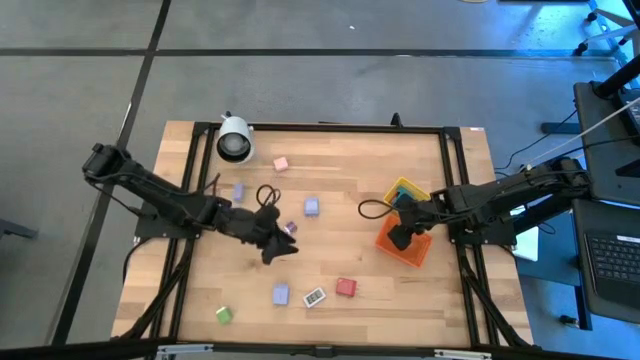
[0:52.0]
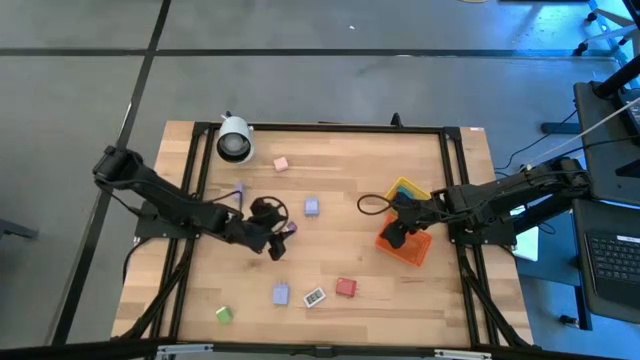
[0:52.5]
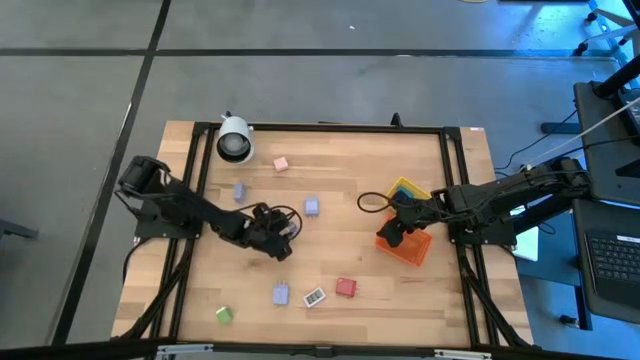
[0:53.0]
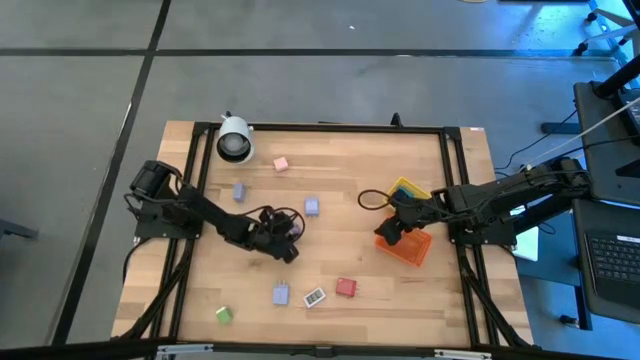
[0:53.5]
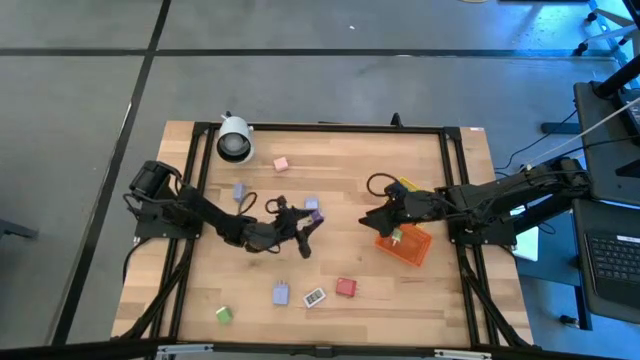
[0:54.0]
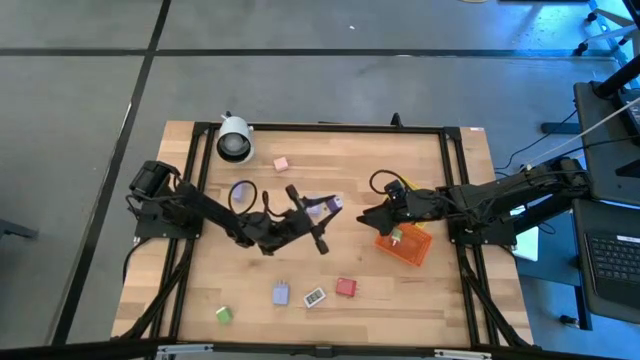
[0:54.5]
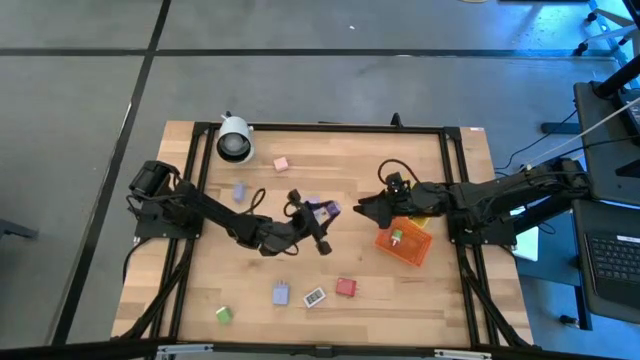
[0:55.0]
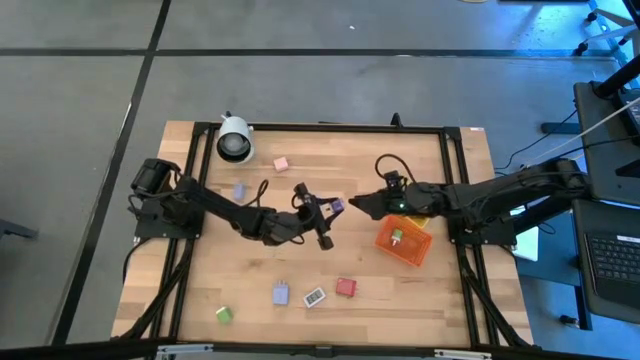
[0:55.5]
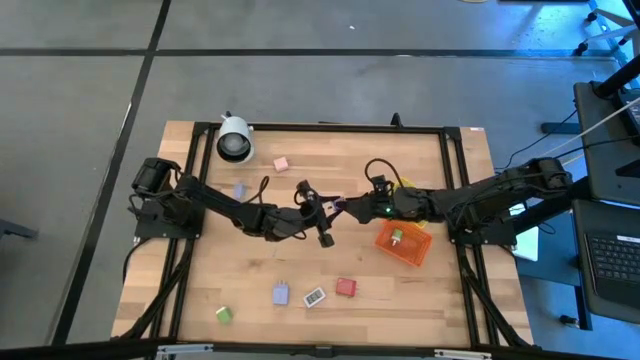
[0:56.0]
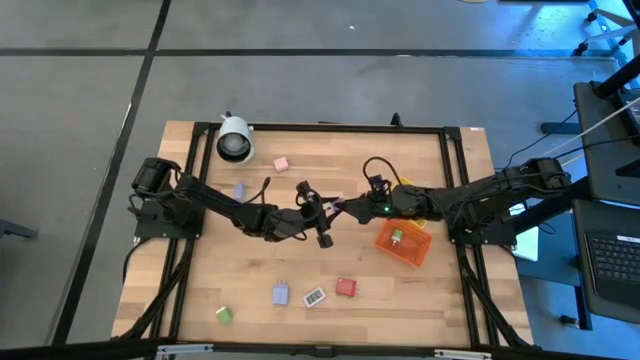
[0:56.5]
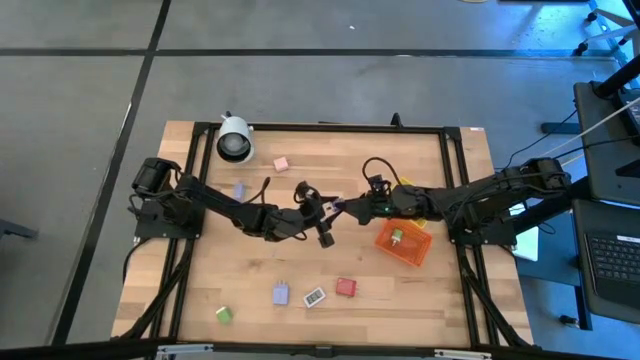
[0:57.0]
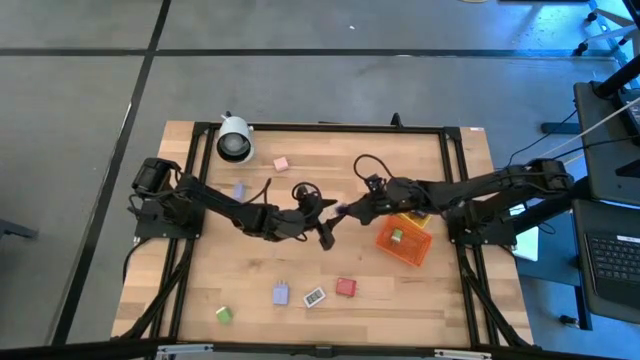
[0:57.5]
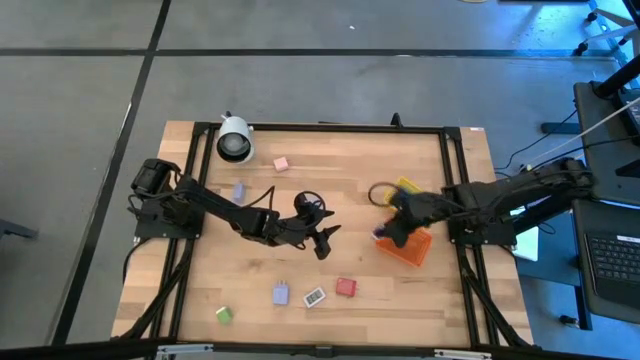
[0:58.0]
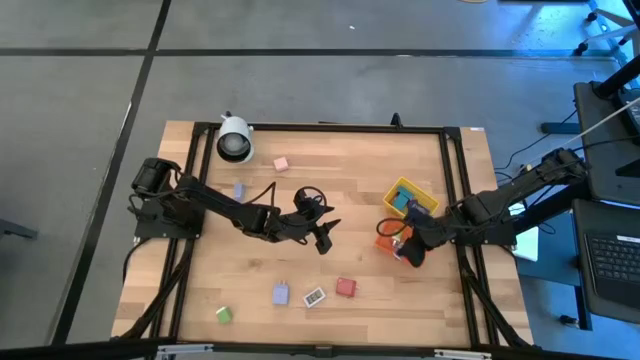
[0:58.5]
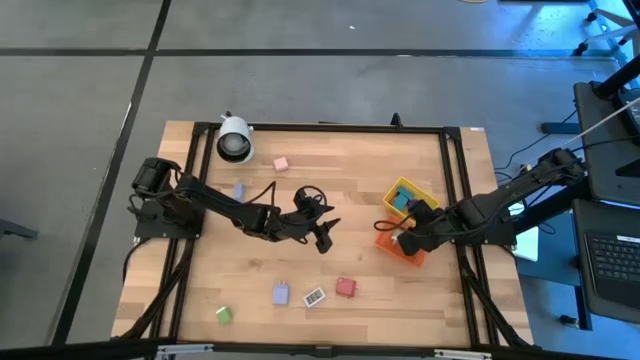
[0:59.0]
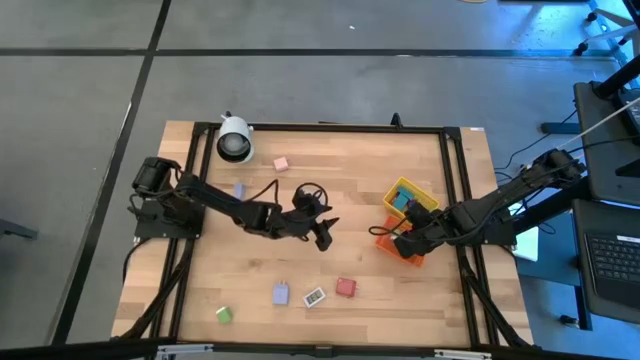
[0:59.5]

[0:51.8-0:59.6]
Task: Pick & Place Office items
Put the purple charger adapter into the orange basket

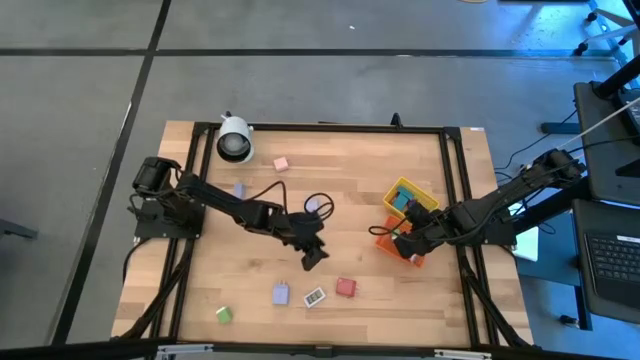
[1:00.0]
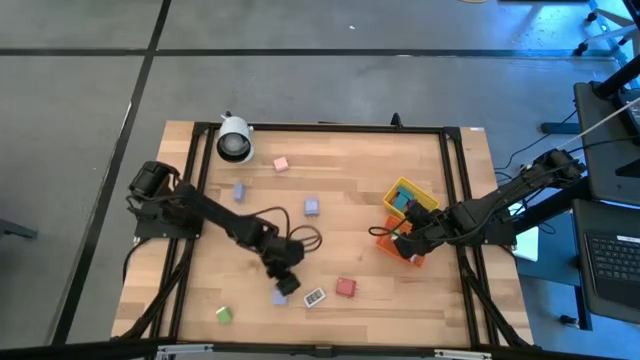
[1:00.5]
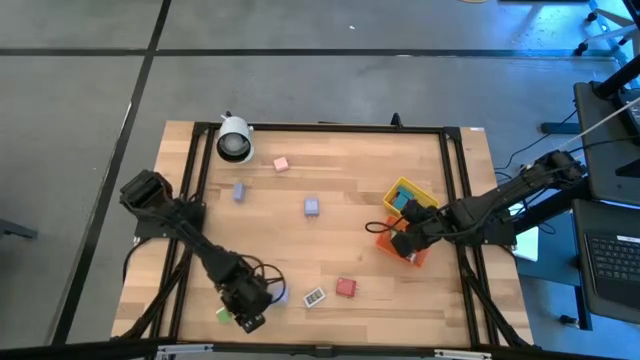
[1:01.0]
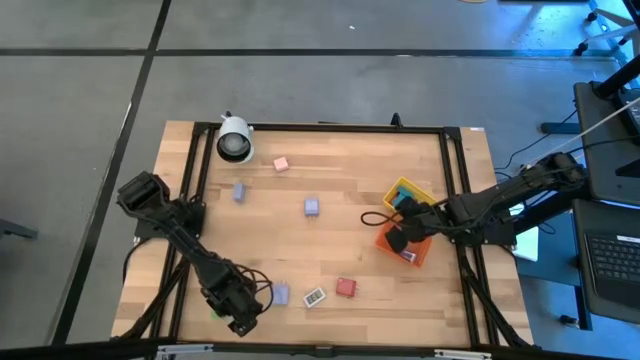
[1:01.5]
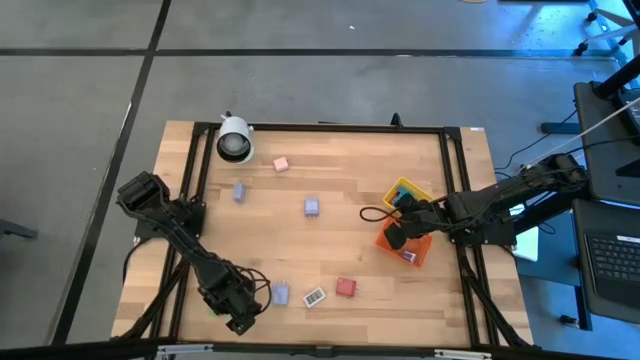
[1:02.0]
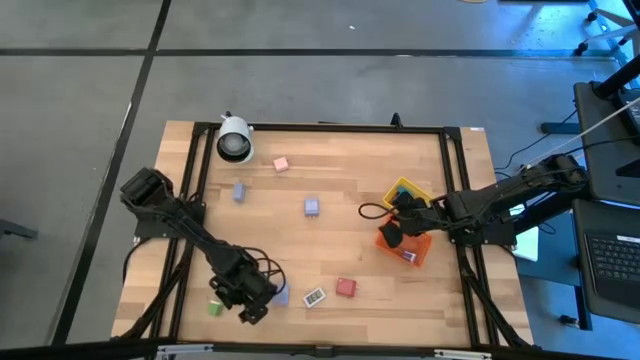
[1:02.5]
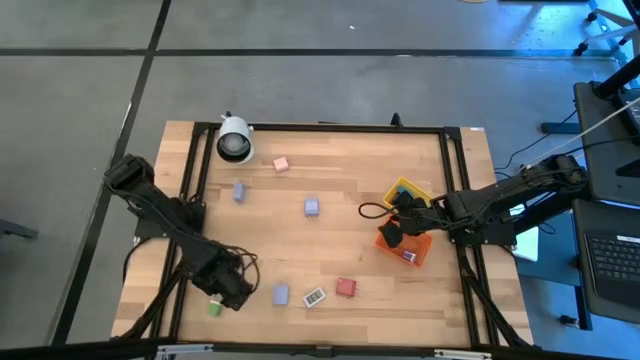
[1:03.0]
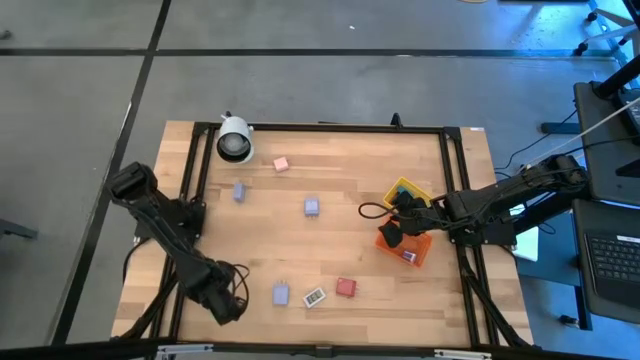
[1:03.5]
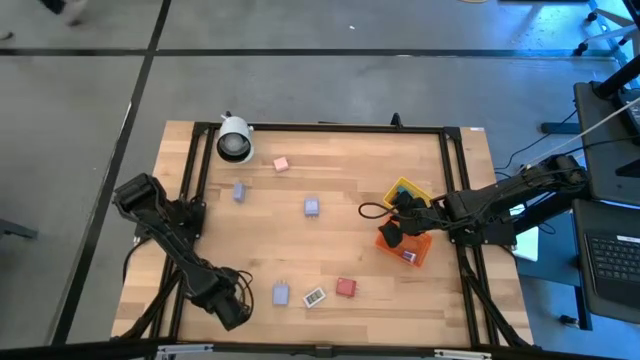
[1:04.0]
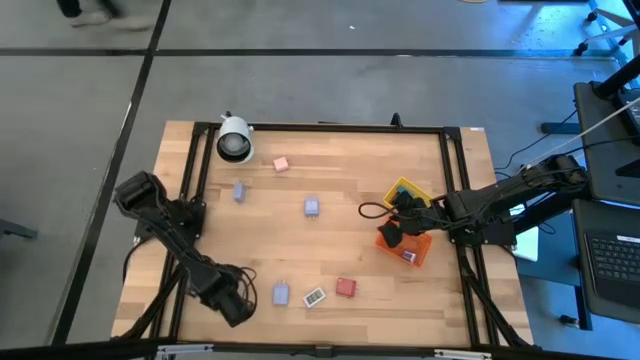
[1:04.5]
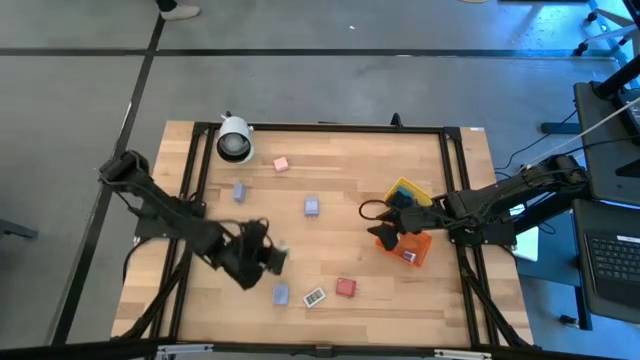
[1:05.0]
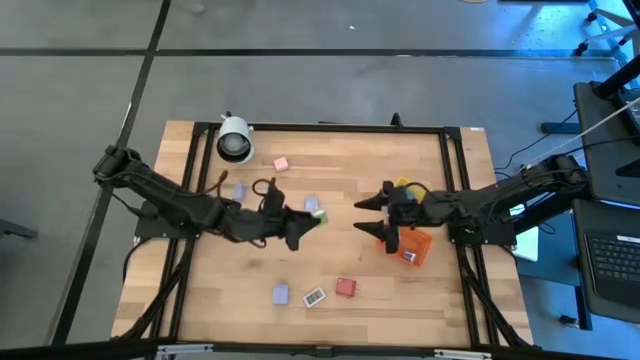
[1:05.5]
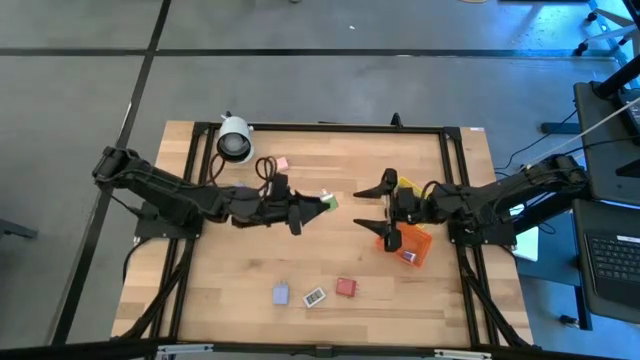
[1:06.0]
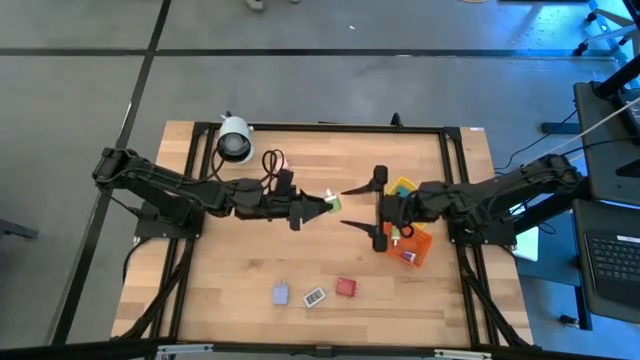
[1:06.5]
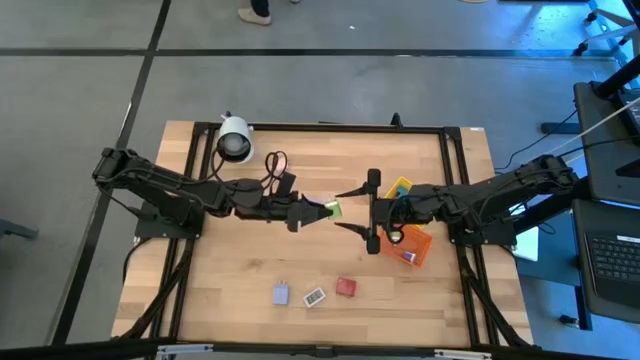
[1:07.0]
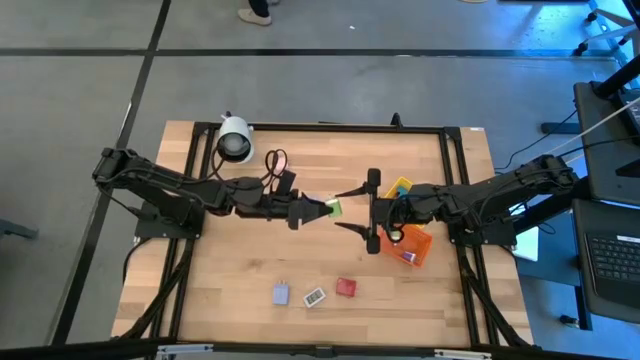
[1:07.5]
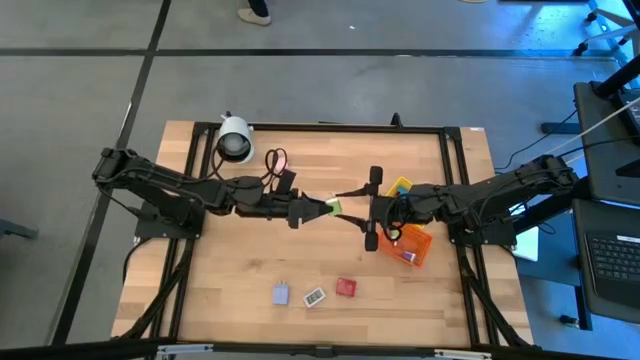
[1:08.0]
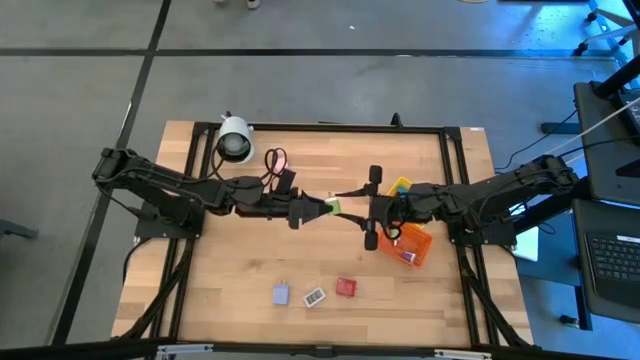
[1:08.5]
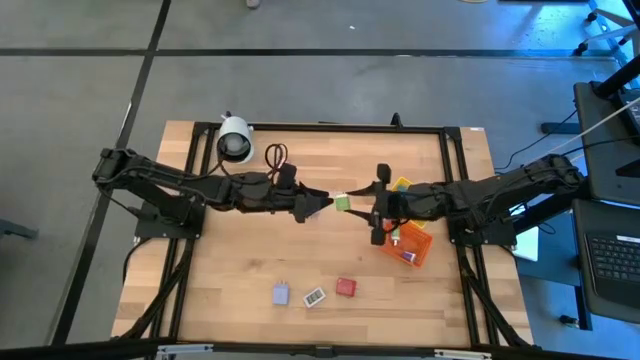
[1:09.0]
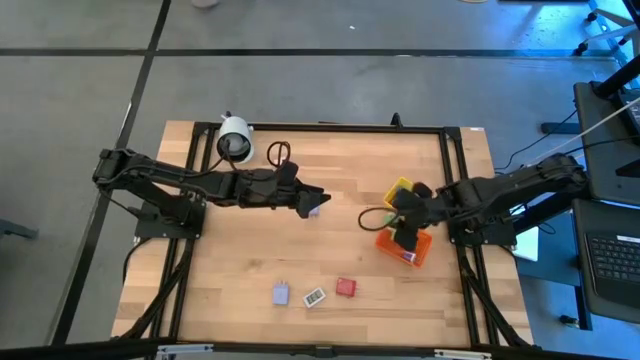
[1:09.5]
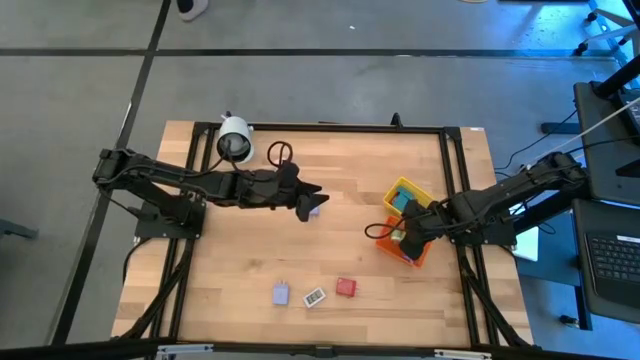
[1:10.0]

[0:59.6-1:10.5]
Put the green charger adapter into the orange basket

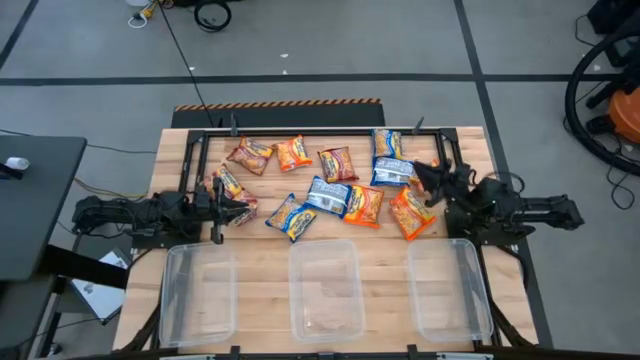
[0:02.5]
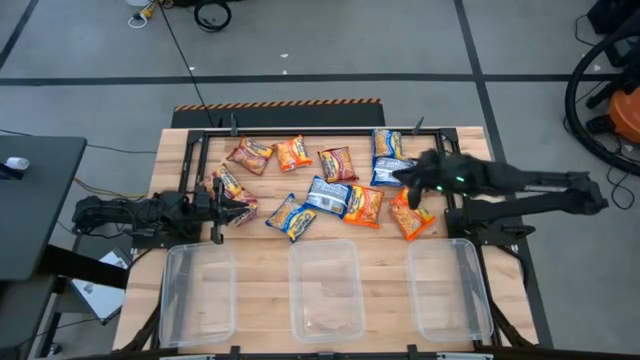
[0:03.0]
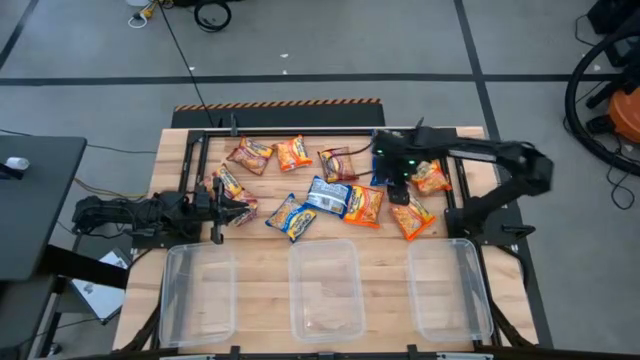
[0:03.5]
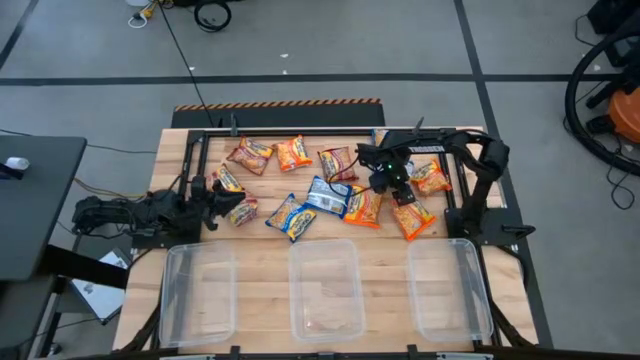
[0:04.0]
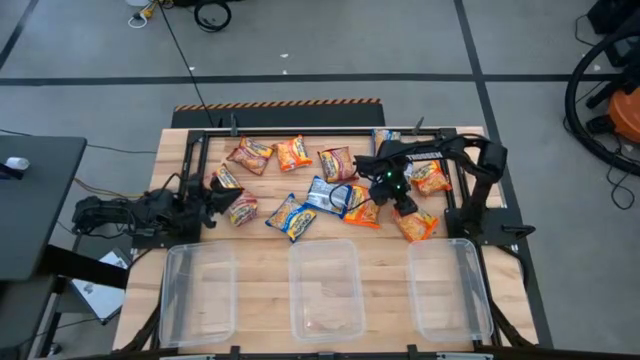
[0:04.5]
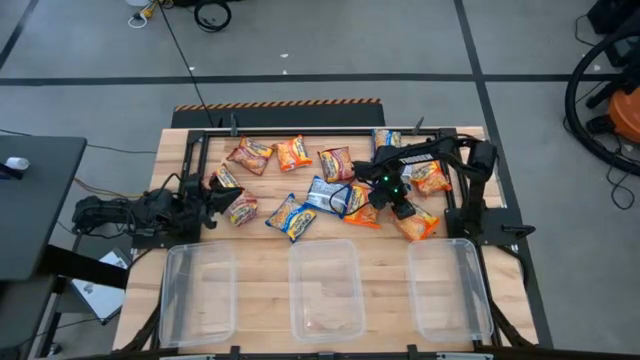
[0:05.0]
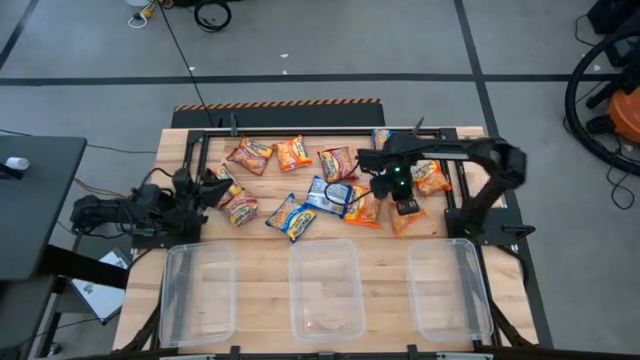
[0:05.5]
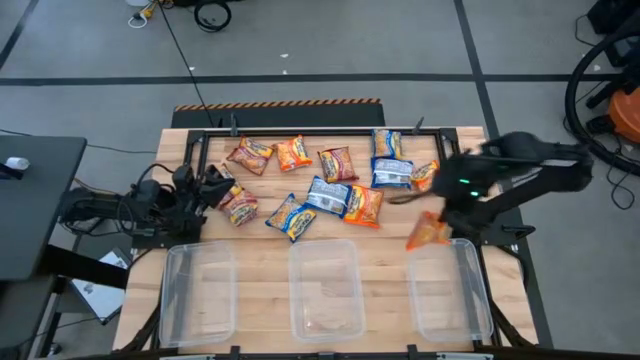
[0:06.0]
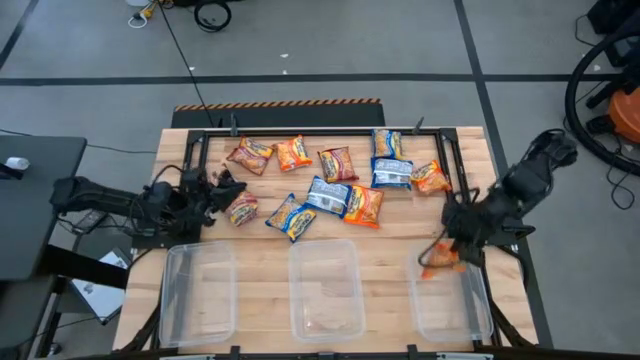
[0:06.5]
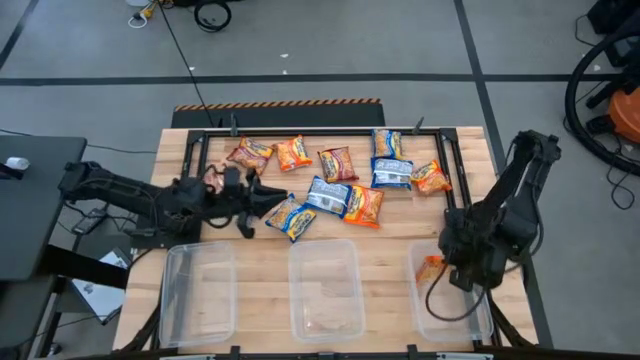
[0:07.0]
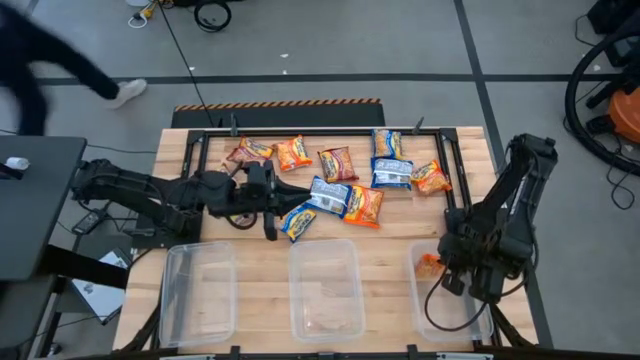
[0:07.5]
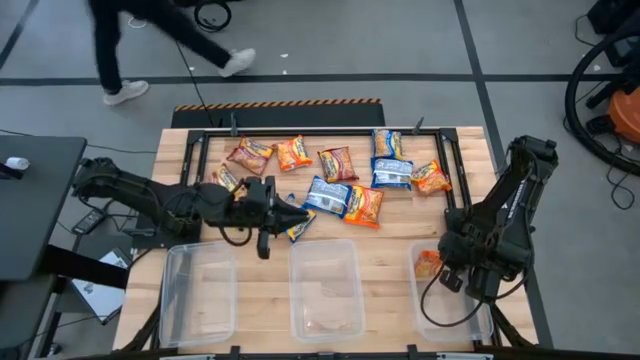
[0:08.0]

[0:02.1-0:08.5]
Task: Sort Maruchan noodles
Put the bottom right orange noodle pack into the right transparent bin
